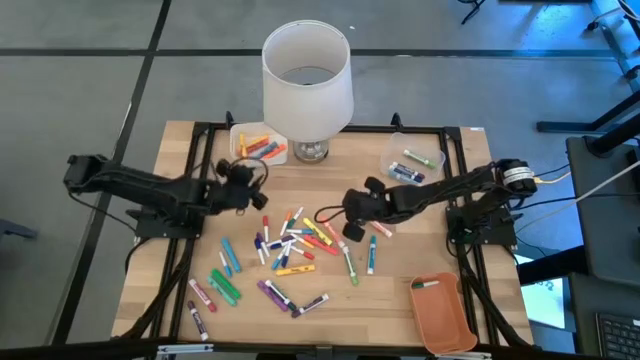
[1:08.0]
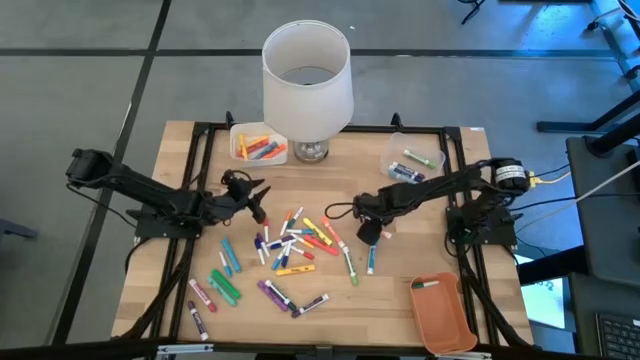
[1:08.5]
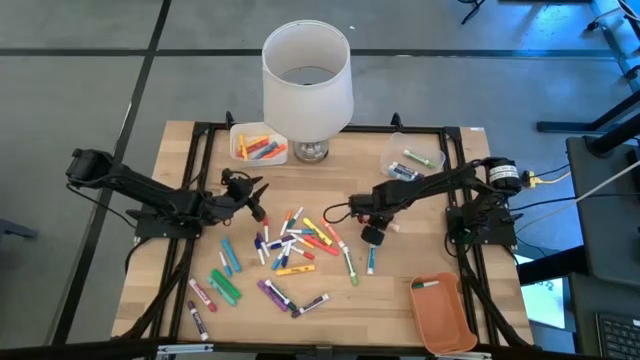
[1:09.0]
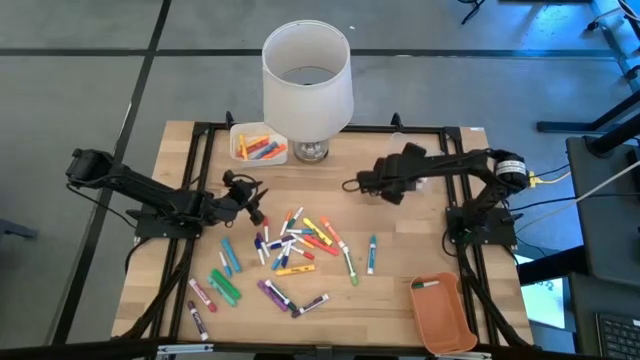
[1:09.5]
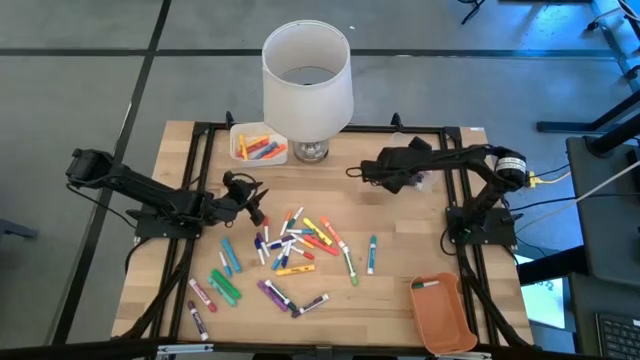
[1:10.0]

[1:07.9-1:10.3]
Task: Pick & Place Markers
Put the thick orange dry erase marker into the transparent bin

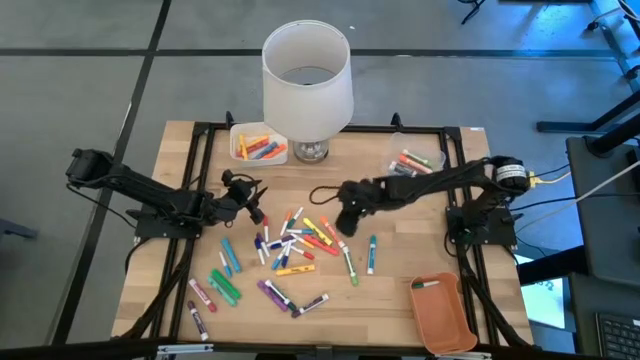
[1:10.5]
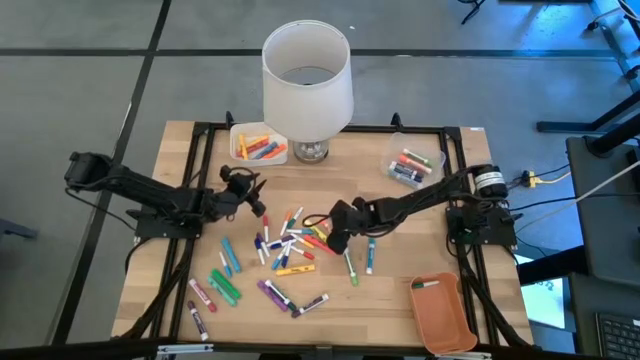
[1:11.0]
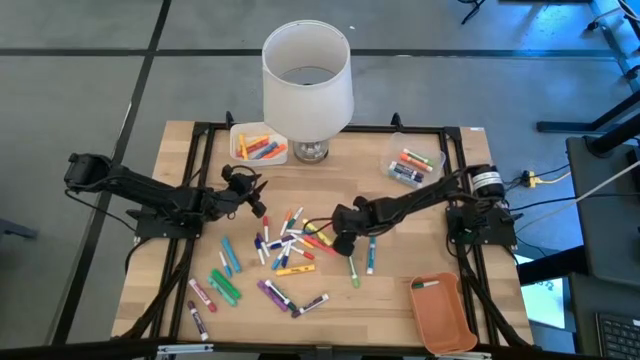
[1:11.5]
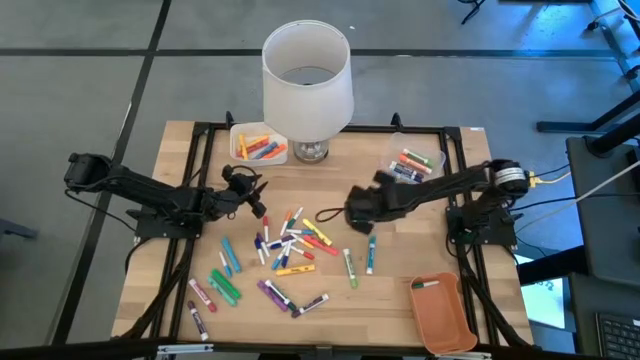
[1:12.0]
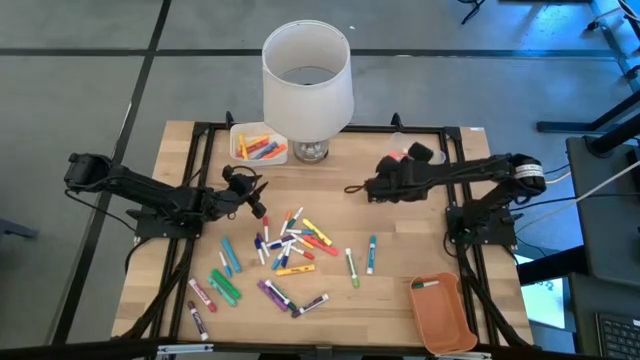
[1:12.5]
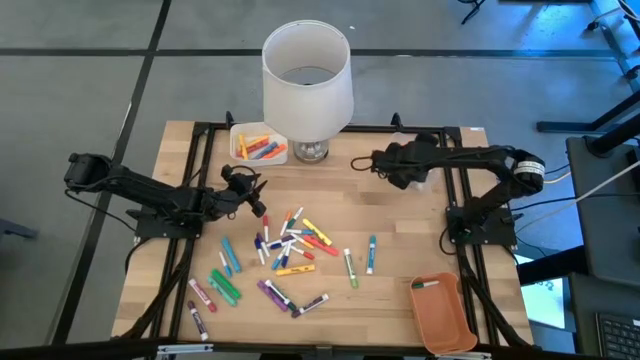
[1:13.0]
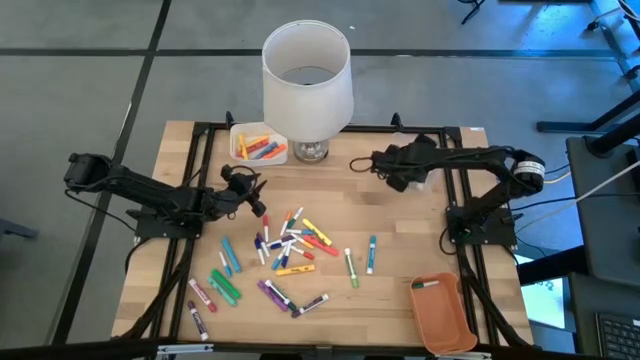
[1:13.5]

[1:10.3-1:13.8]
Put the thick orange dry erase marker into the transparent bin

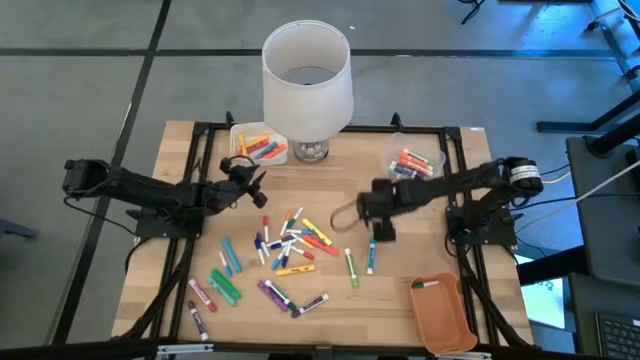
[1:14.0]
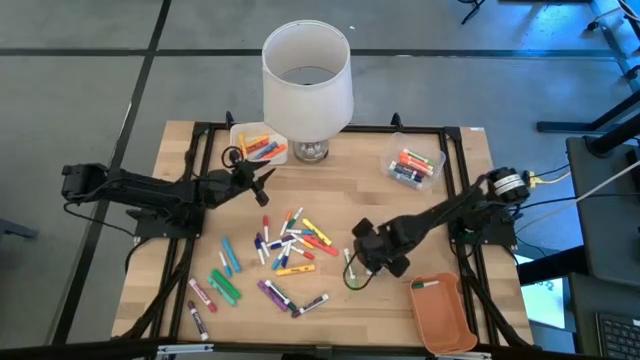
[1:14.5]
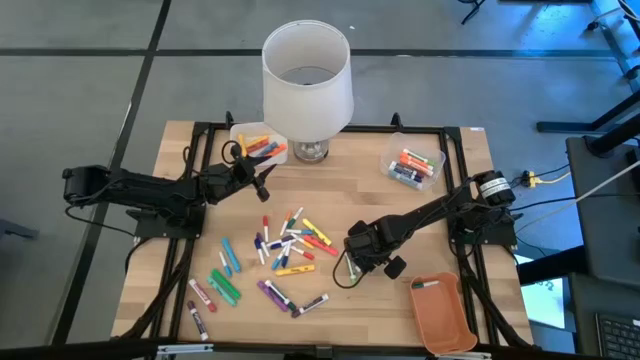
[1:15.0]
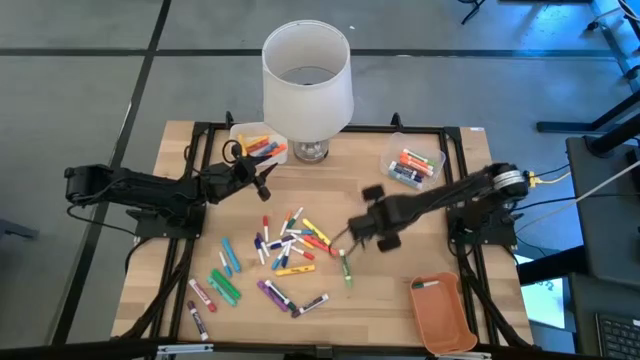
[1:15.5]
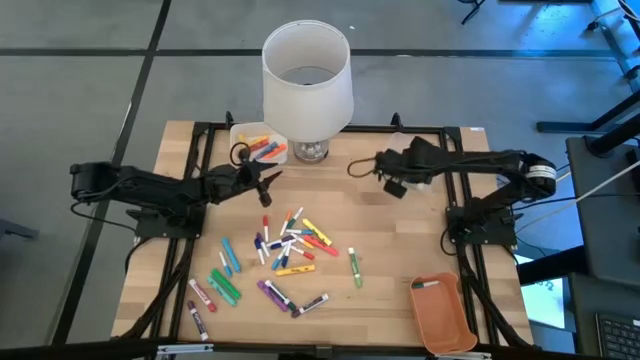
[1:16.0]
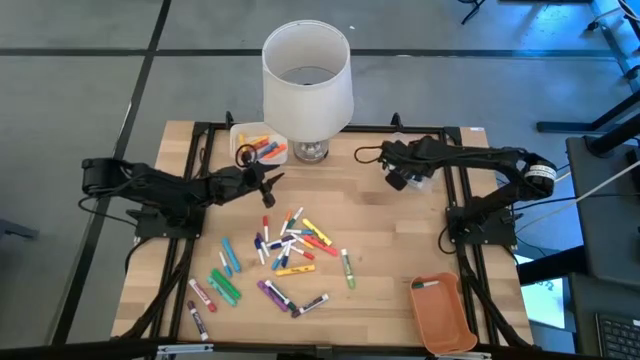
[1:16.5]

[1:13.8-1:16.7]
Put the thick light blue dry erase marker into the transparent bin

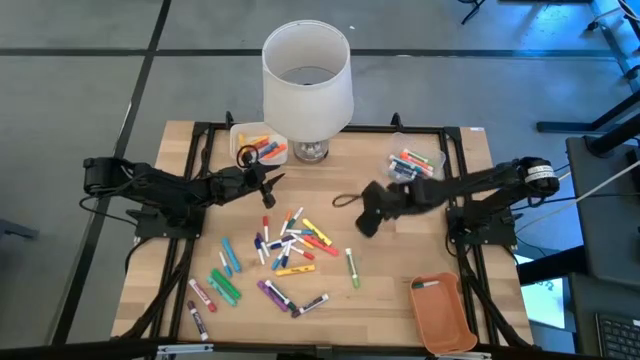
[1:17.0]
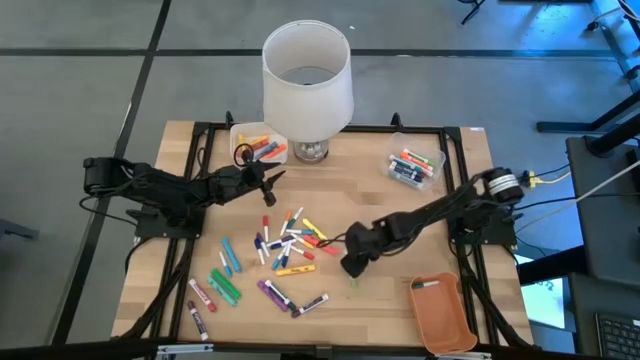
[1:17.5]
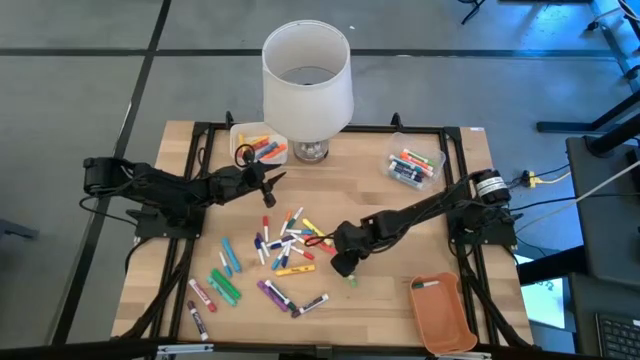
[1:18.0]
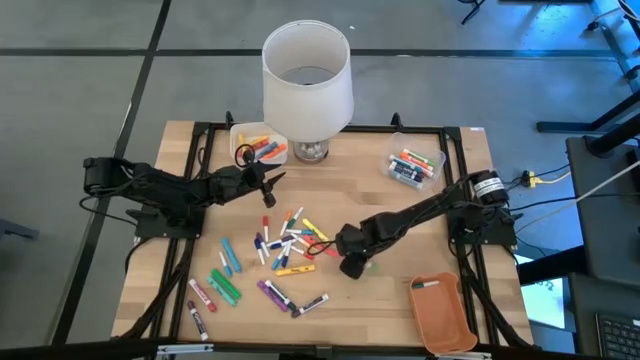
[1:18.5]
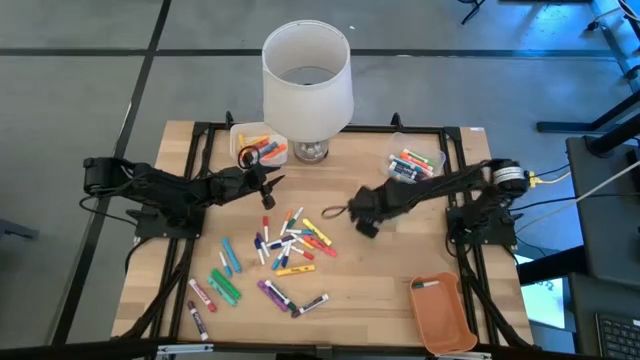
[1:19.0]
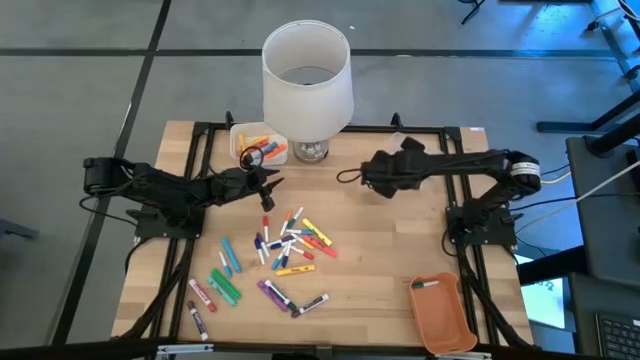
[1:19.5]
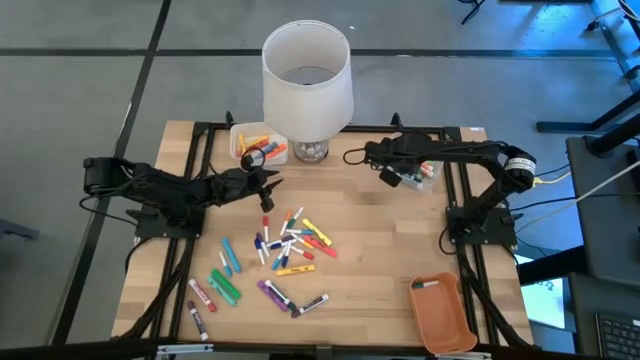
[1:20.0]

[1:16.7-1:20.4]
Put the thick dark green dry erase marker into the transparent bin

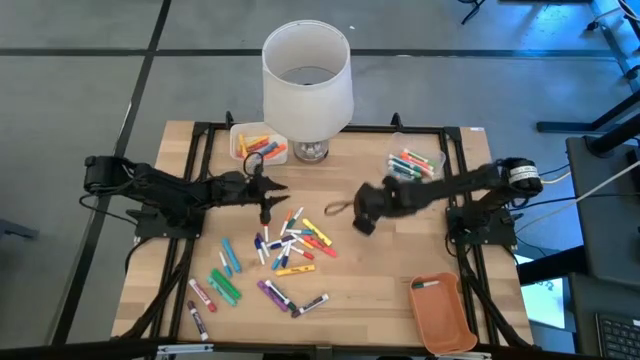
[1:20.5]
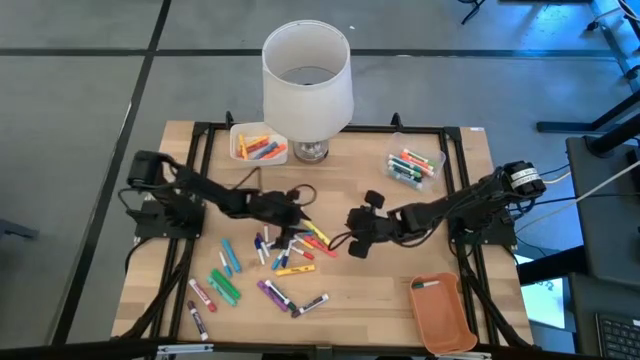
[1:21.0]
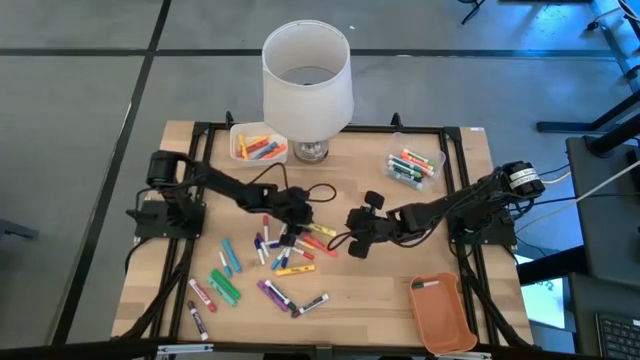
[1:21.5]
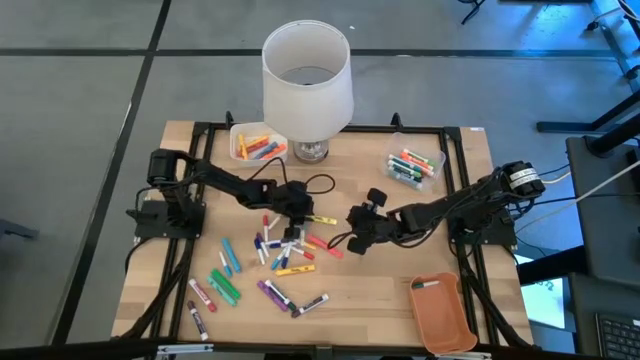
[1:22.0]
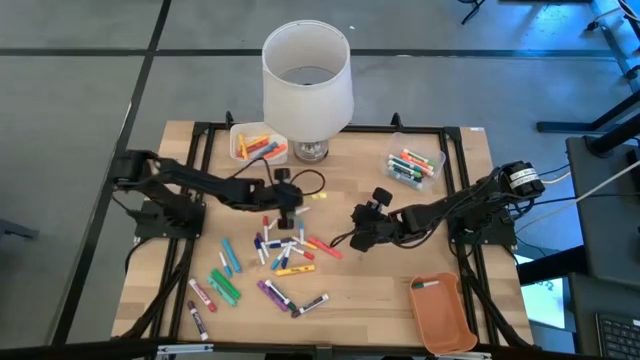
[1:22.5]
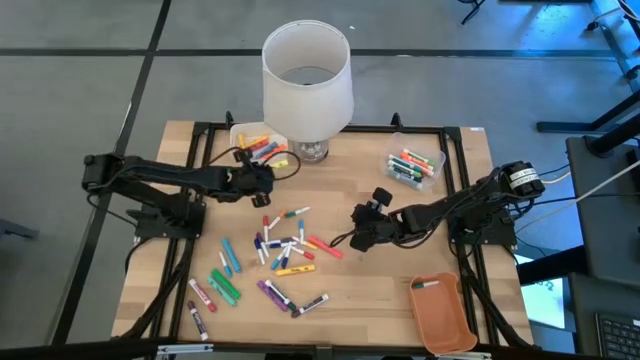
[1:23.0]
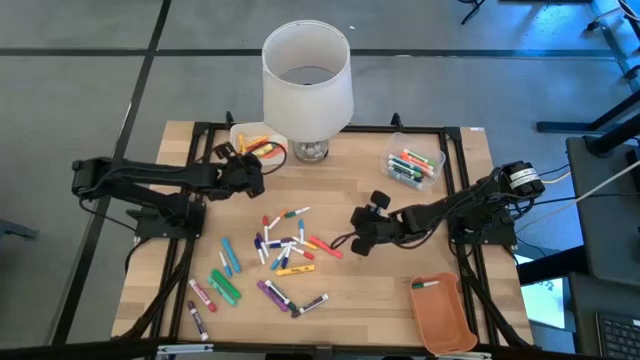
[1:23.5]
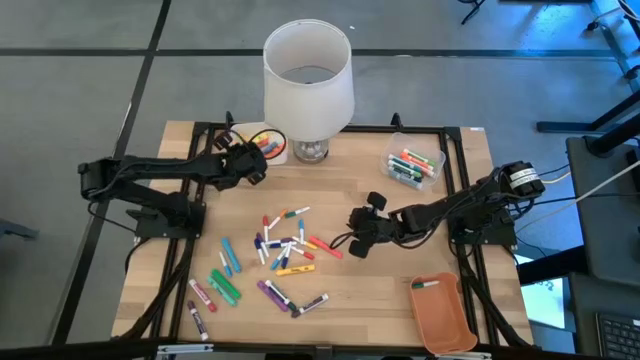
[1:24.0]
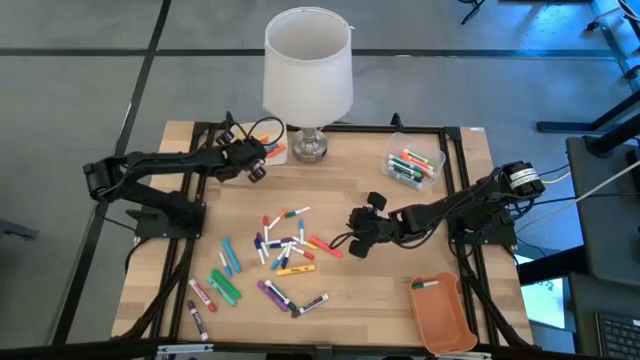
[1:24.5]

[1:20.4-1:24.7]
Put the light yellow highlighter into the white bin

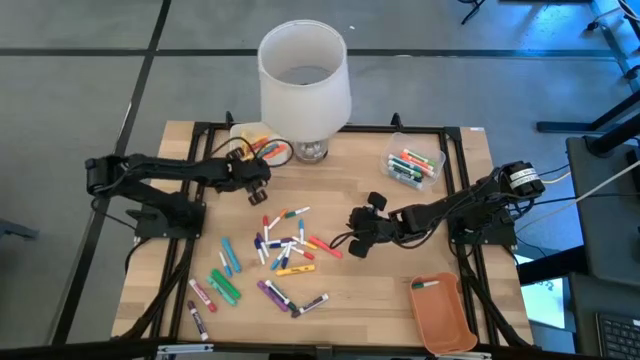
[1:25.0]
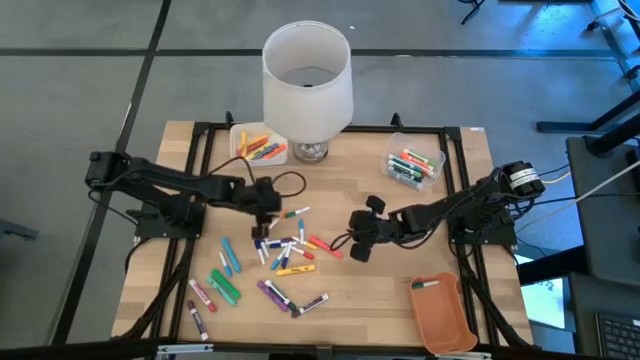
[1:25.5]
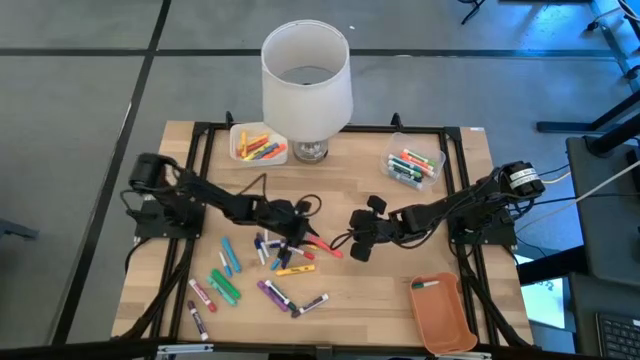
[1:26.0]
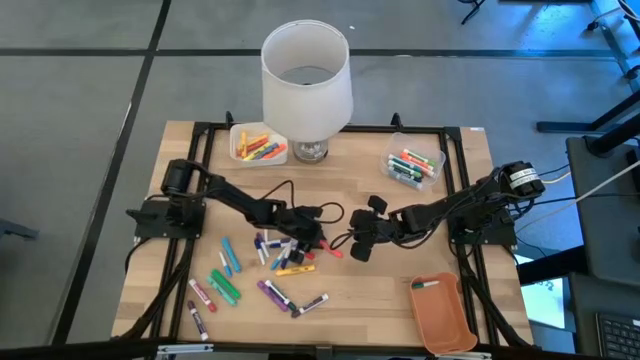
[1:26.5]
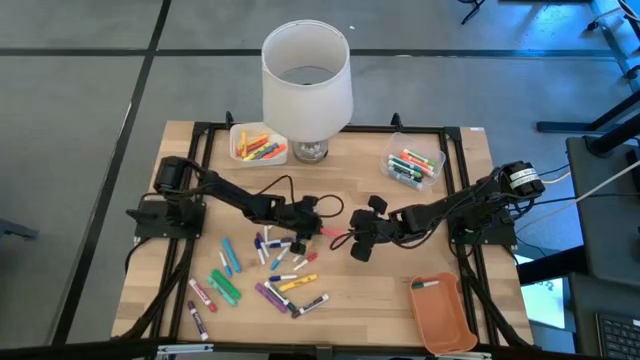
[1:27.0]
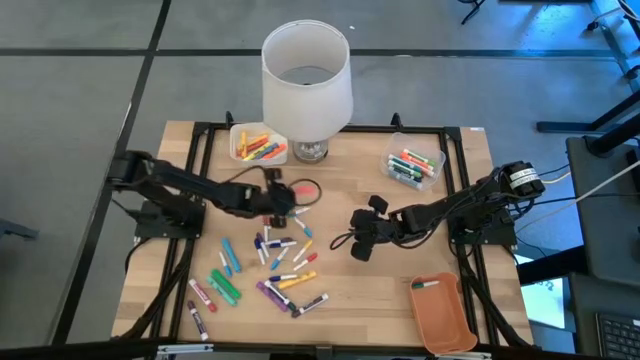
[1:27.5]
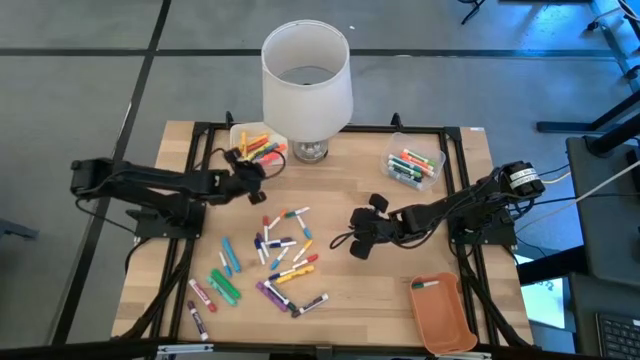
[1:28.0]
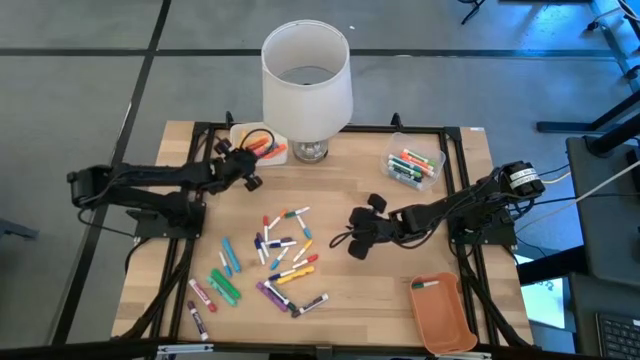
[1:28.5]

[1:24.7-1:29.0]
Put the pink highlighter into the white bin
